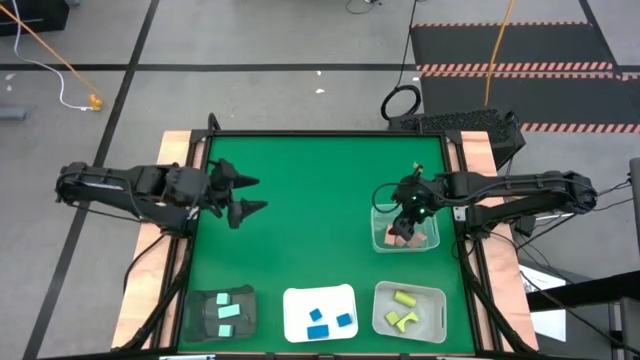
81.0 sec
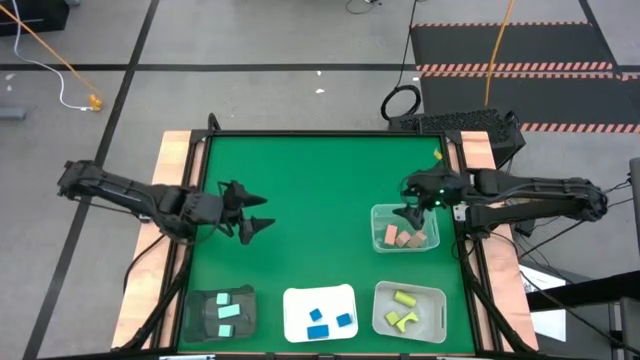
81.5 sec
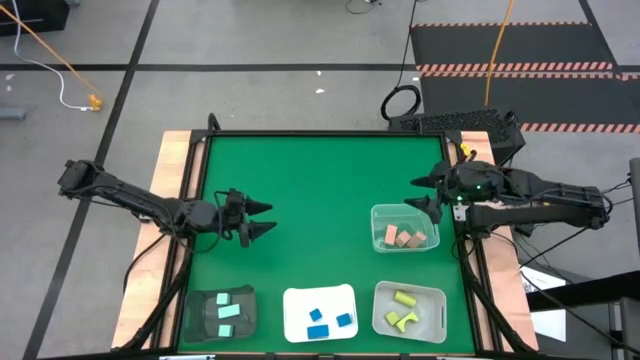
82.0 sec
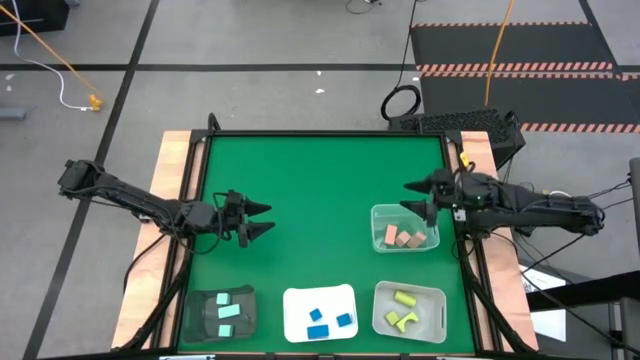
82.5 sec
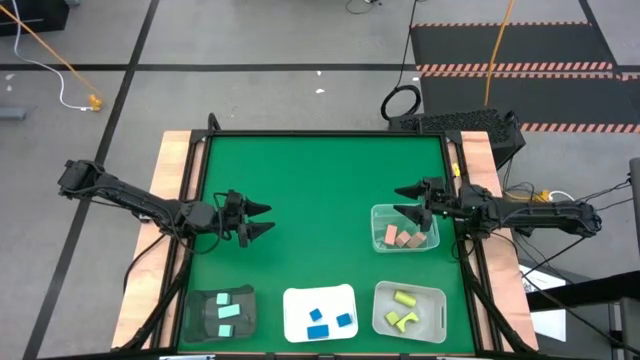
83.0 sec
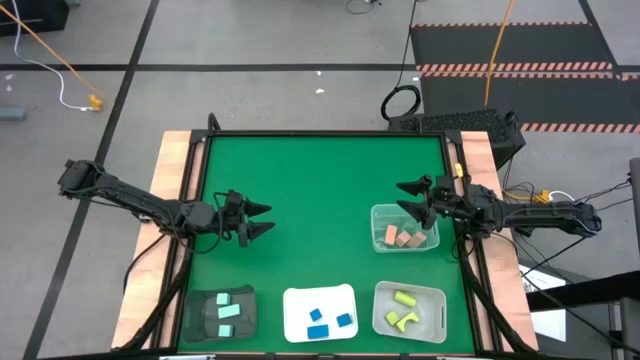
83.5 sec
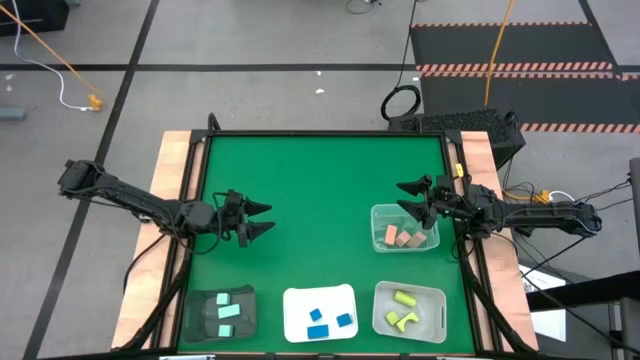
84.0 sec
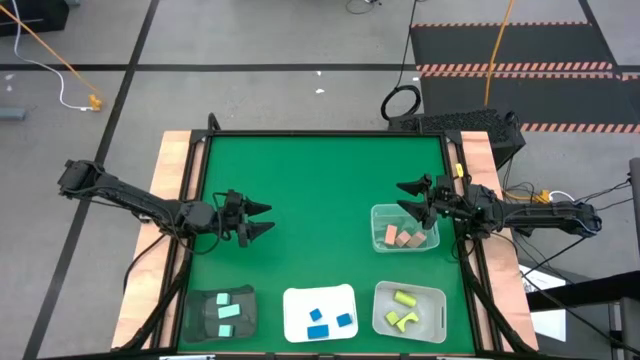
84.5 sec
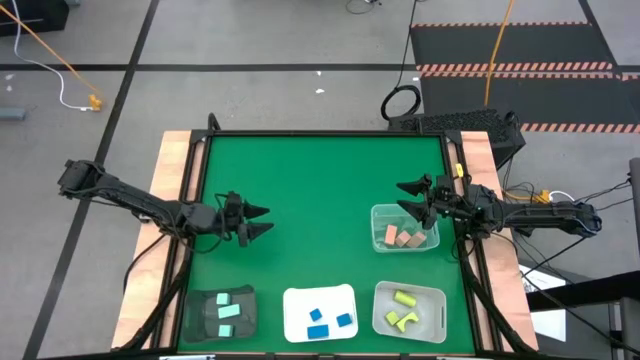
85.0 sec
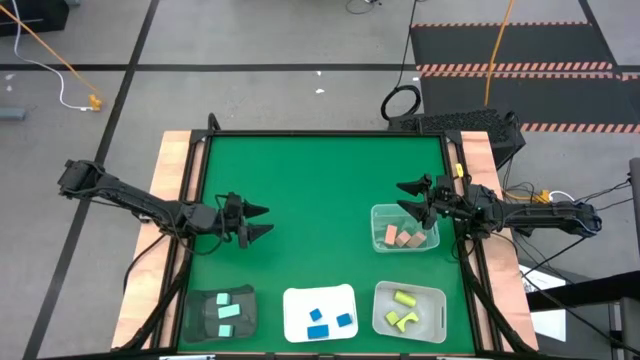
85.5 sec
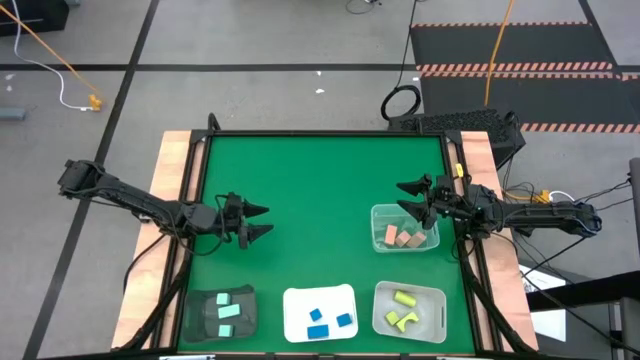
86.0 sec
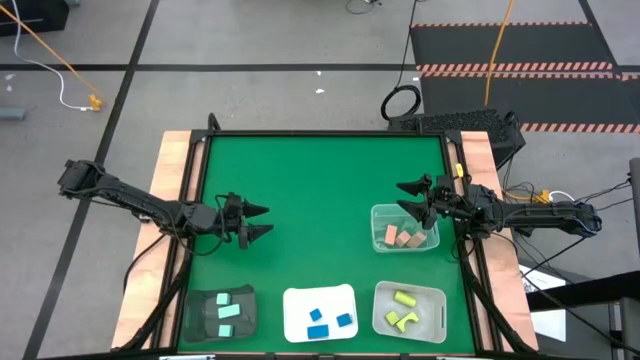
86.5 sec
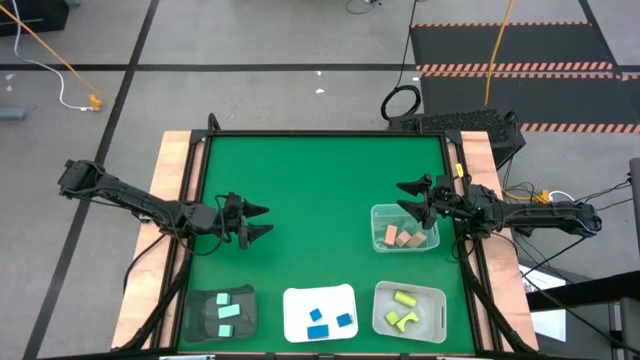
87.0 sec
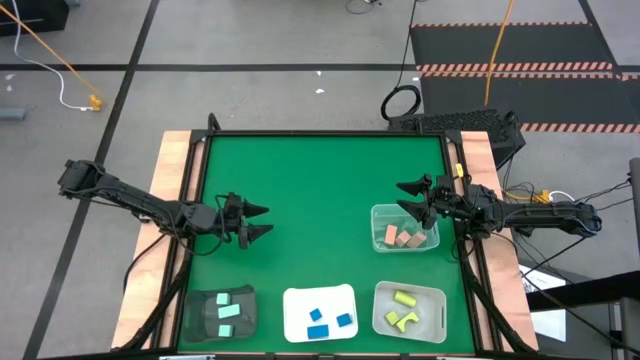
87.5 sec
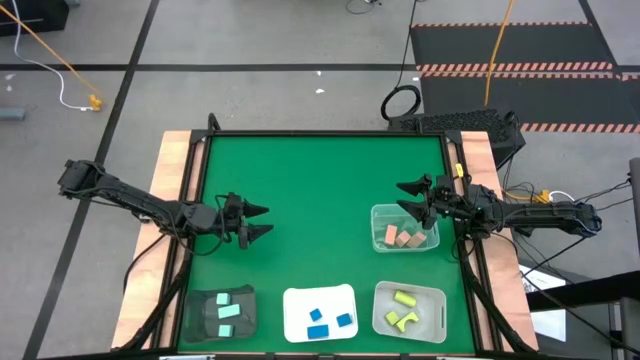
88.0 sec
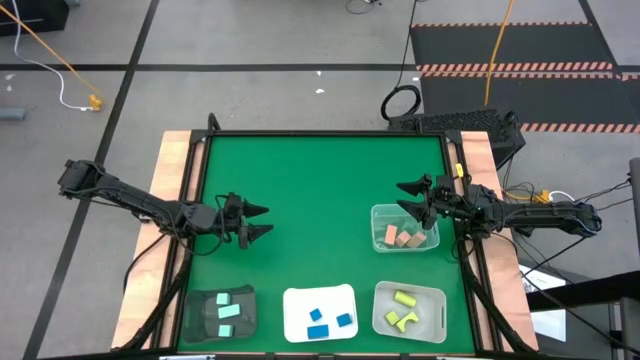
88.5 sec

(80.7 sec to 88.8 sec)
Task: Sort & place blocks by color
Return to Home Position

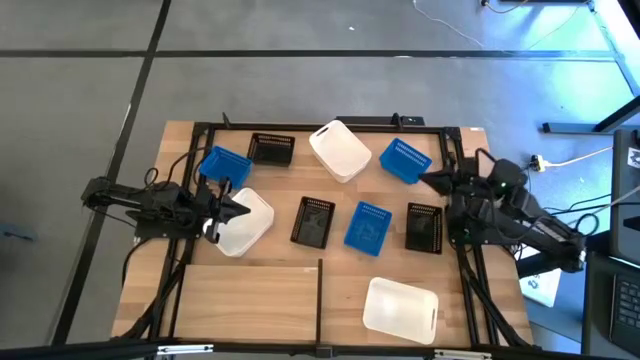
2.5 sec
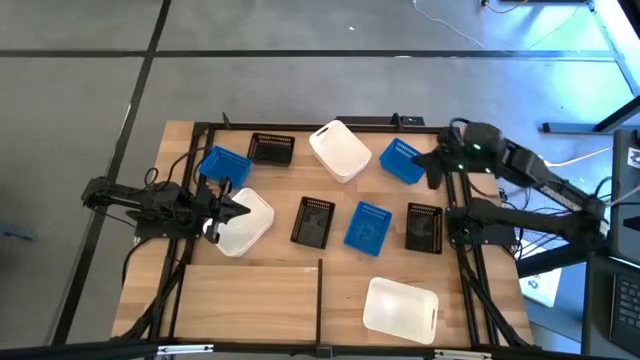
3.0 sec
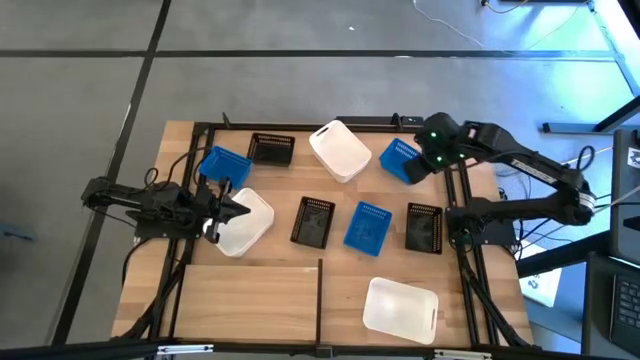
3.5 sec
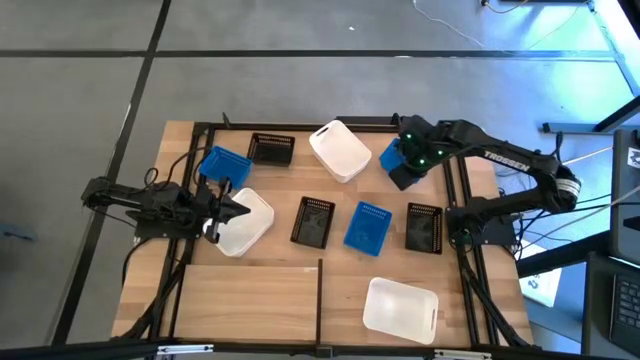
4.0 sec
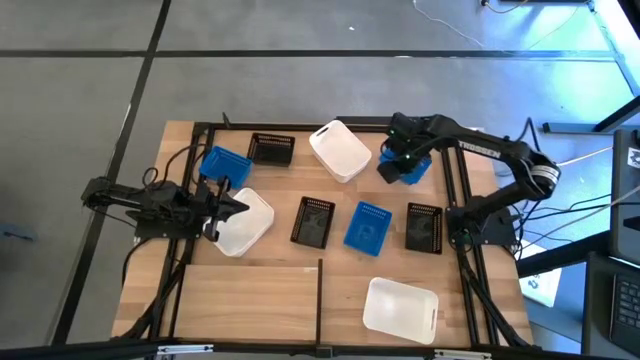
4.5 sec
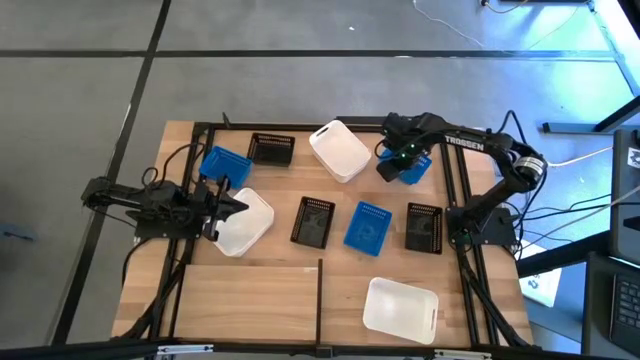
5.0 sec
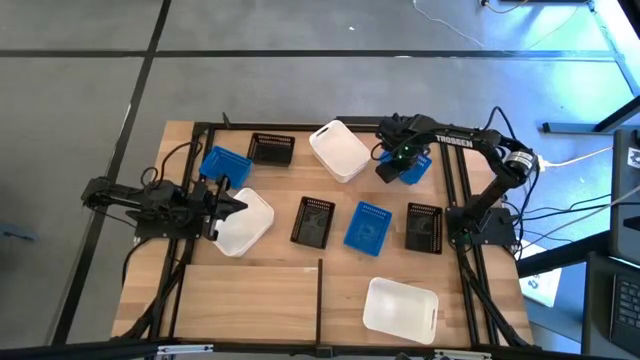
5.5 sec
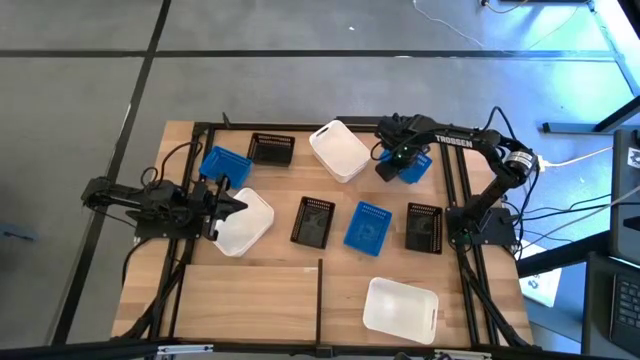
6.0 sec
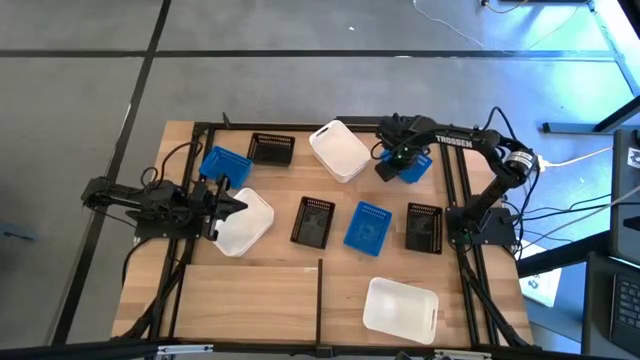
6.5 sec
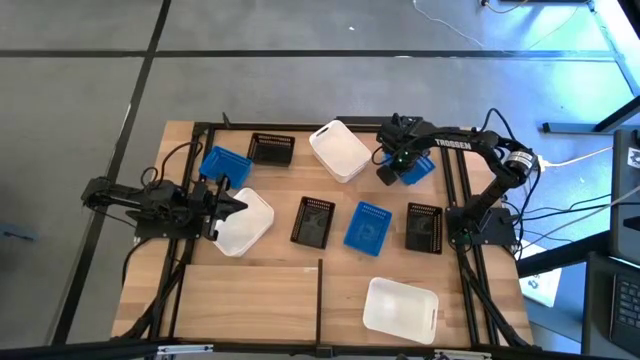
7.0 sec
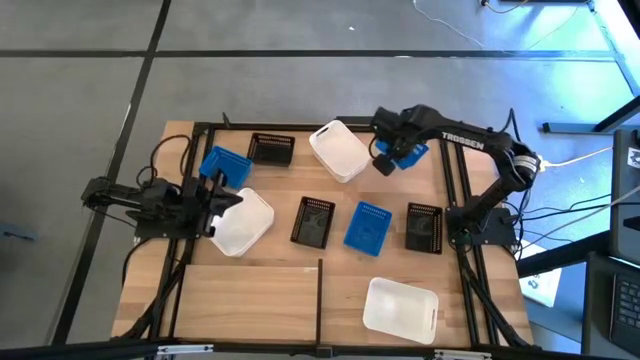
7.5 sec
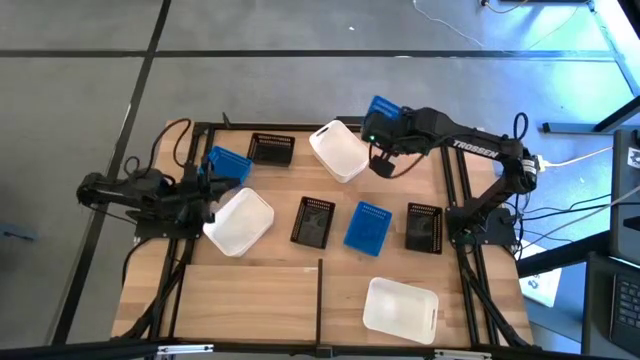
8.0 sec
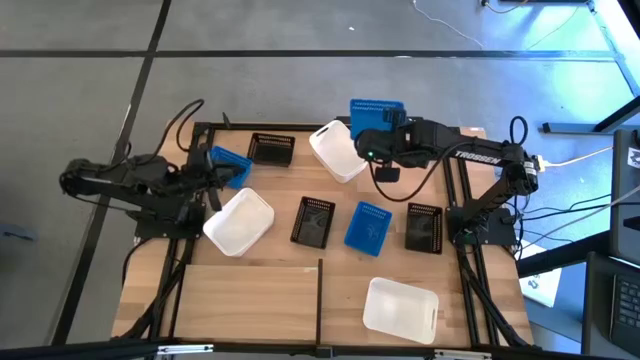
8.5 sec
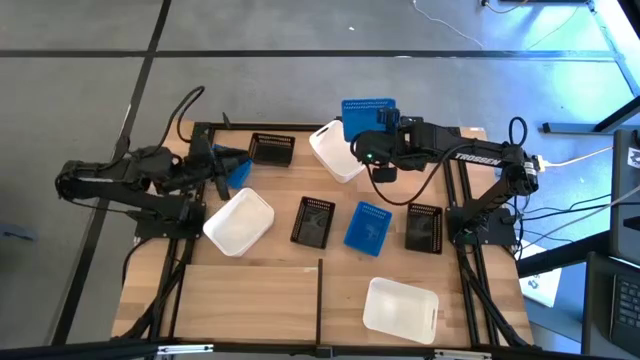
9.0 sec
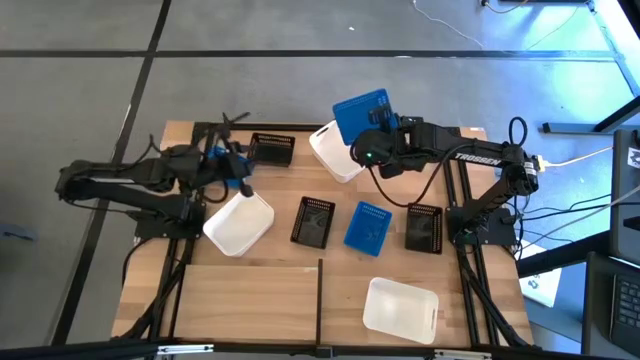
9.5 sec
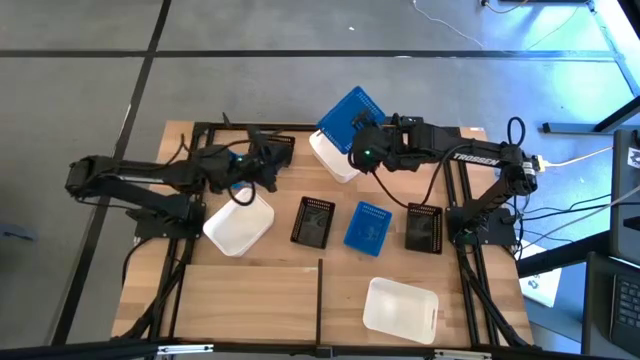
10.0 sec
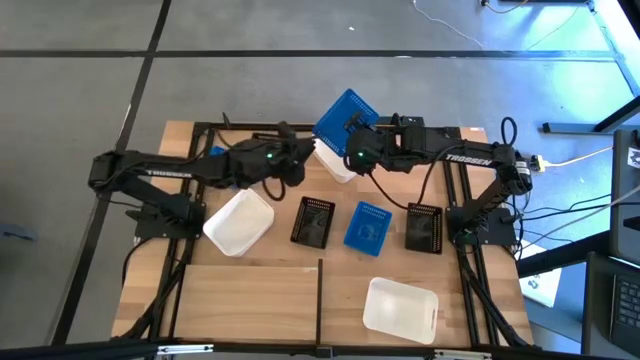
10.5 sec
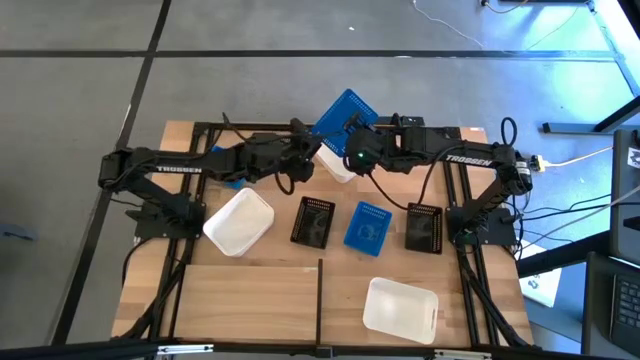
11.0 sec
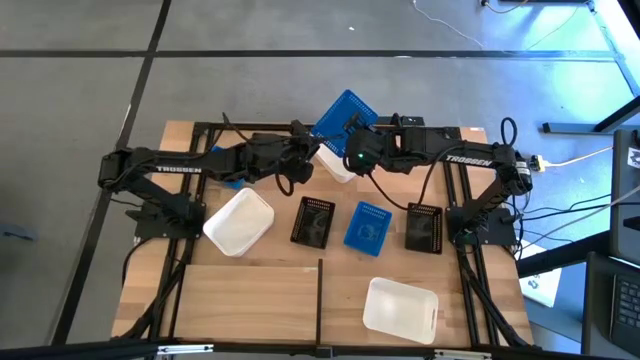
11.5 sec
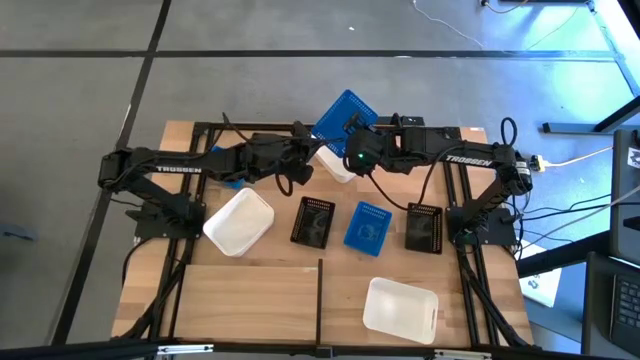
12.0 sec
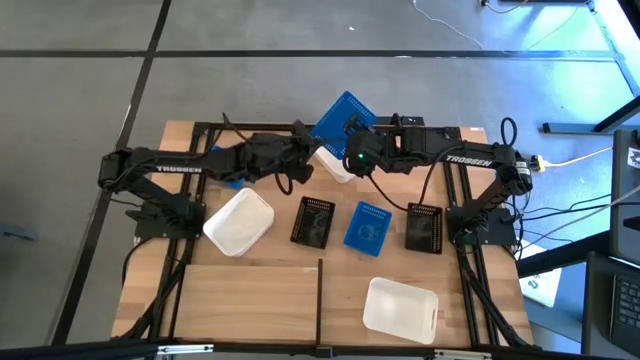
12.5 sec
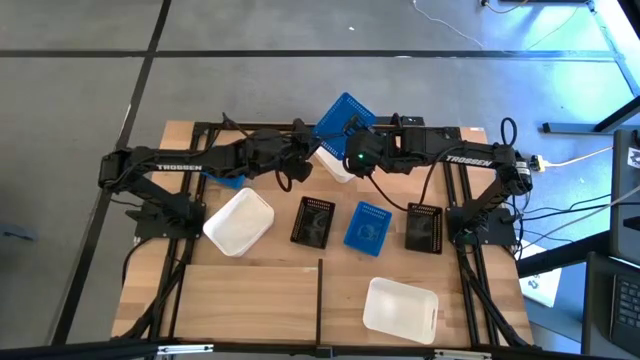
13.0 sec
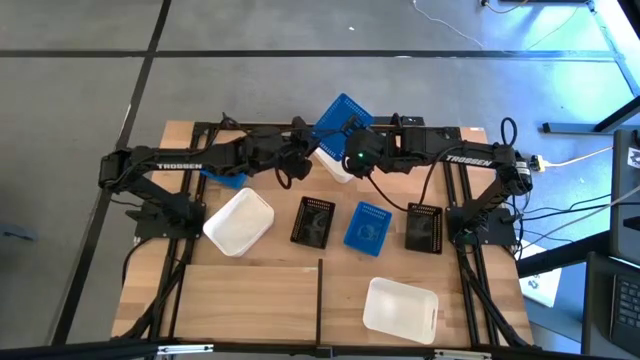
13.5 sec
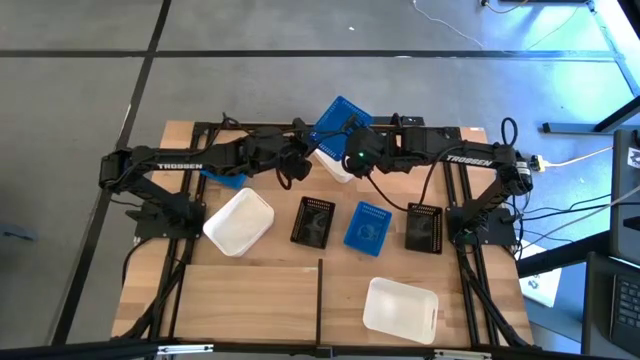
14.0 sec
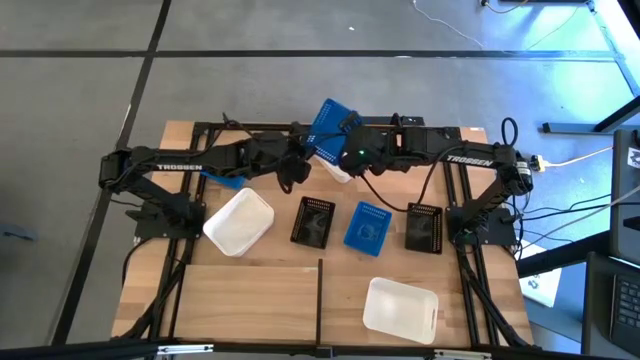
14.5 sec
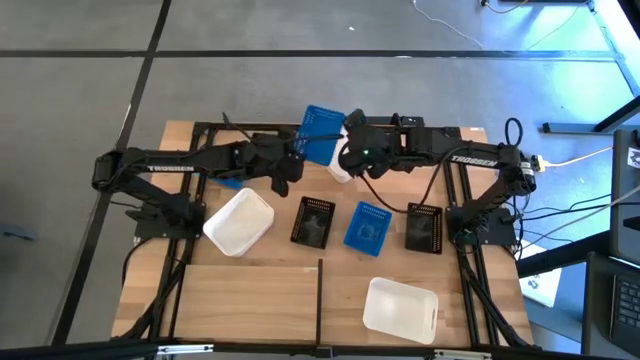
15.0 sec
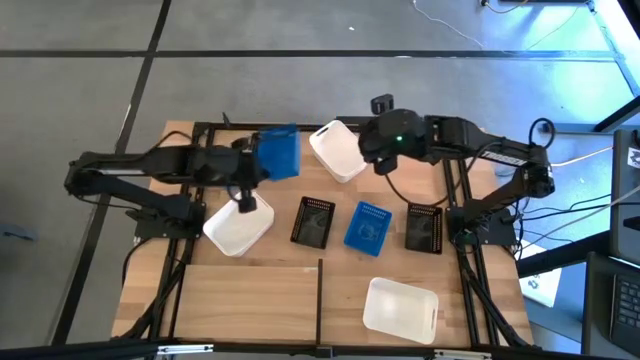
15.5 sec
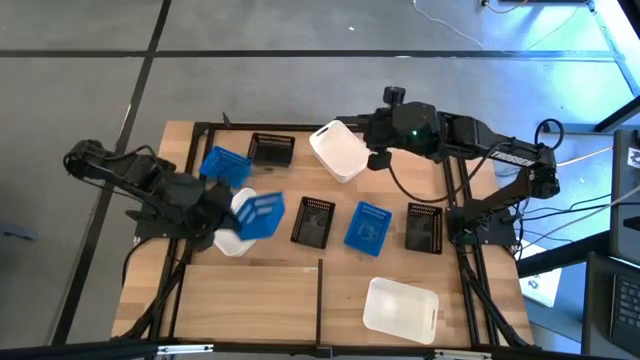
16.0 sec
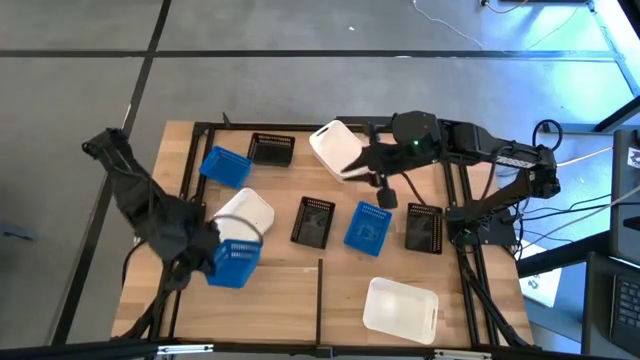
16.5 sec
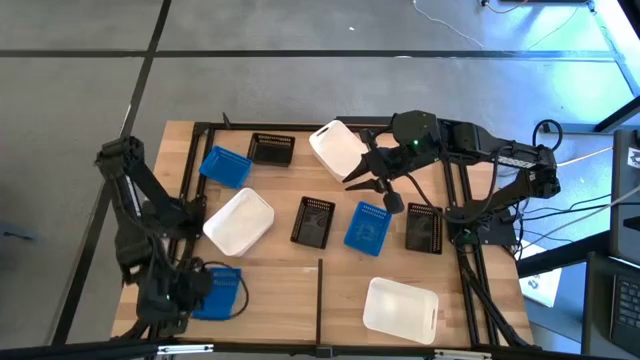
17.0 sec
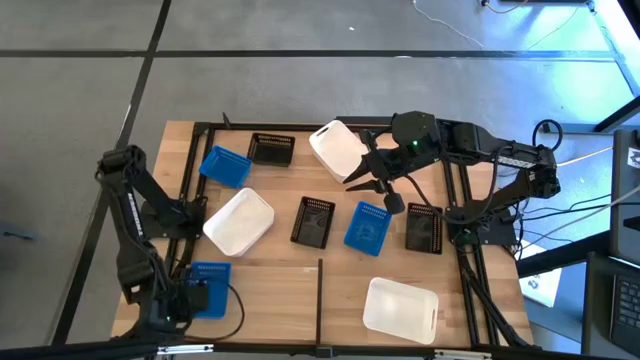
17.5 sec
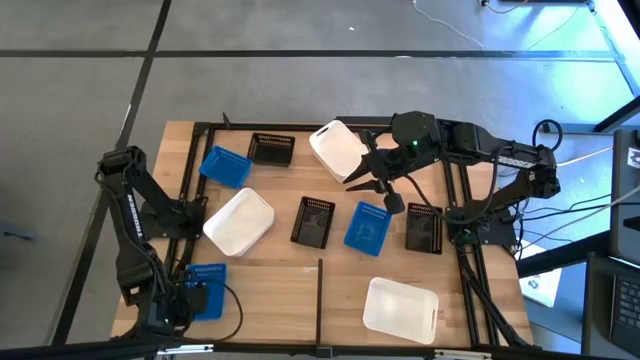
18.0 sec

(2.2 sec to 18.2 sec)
Task: Stack baskets on shelf by color
Put the top right blue bin on the shelf
